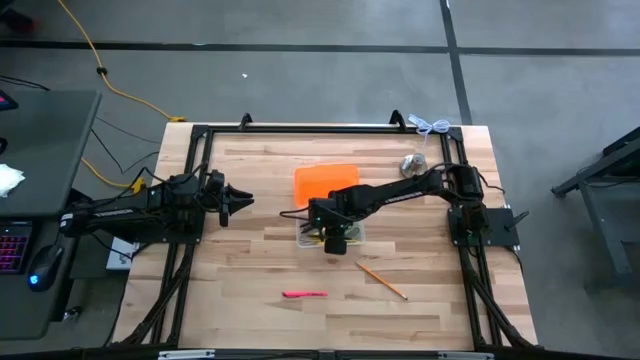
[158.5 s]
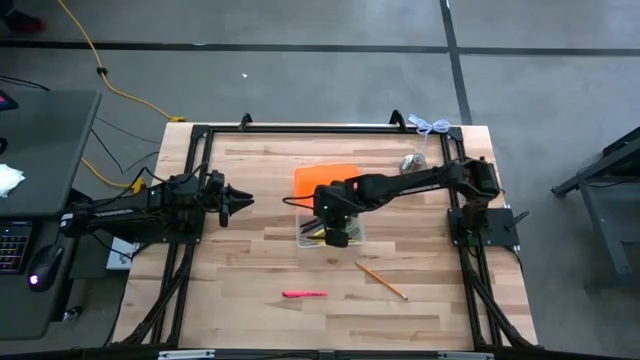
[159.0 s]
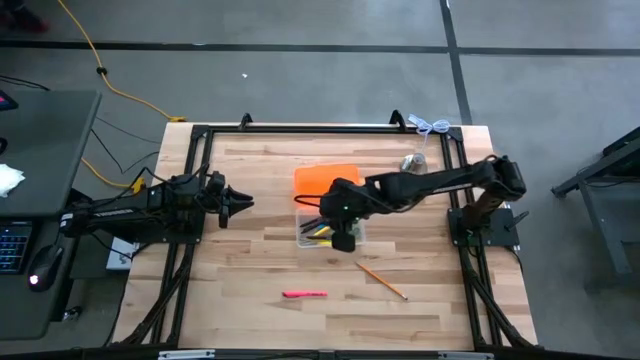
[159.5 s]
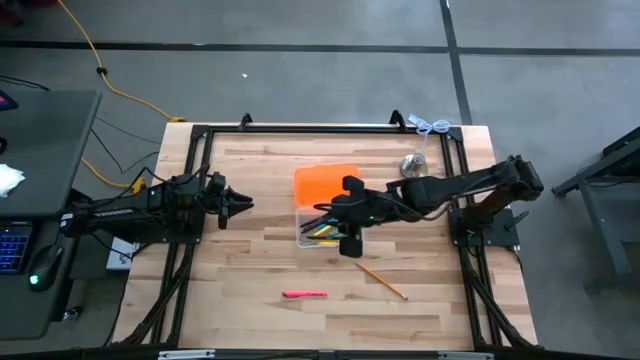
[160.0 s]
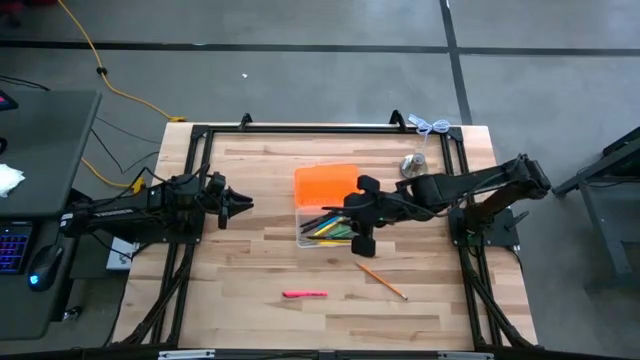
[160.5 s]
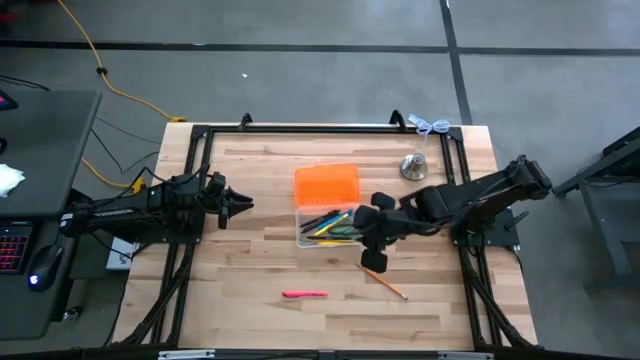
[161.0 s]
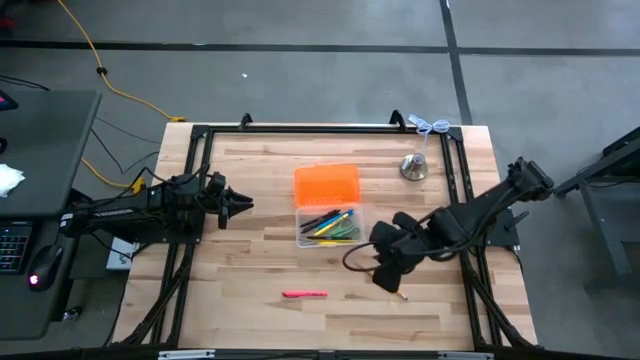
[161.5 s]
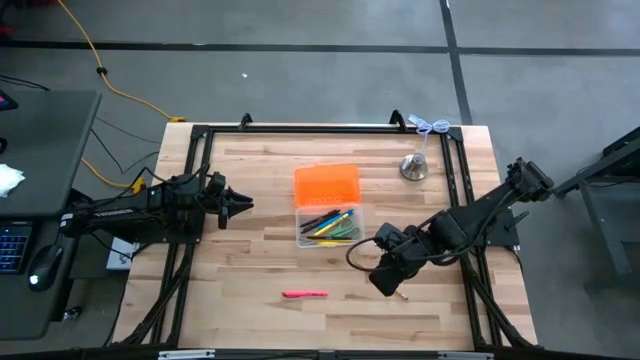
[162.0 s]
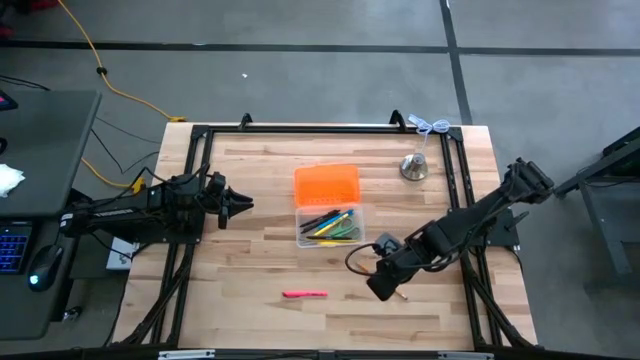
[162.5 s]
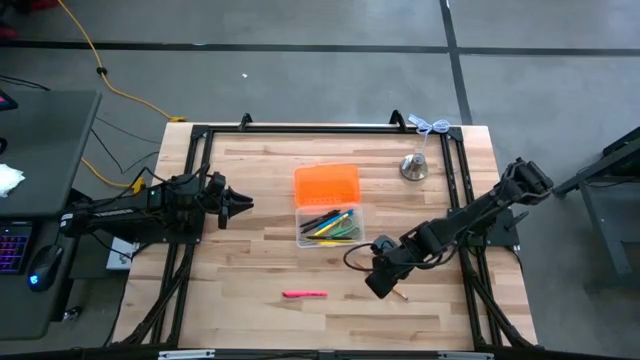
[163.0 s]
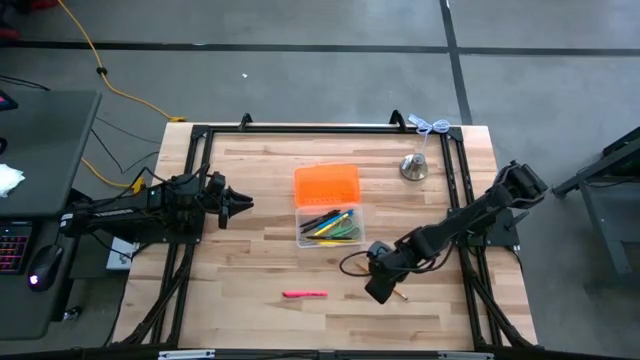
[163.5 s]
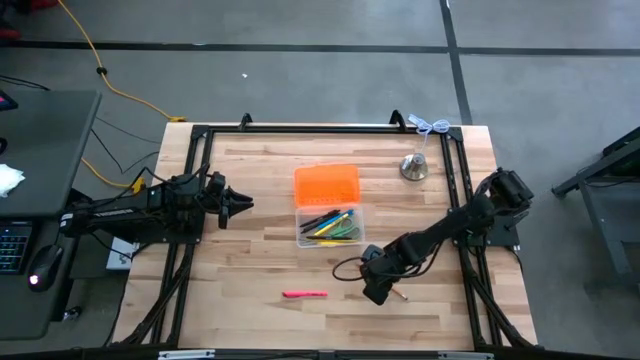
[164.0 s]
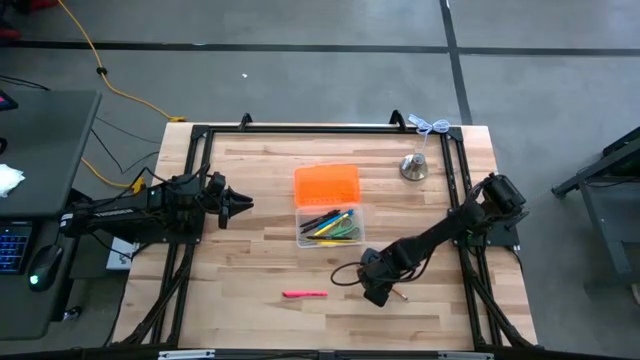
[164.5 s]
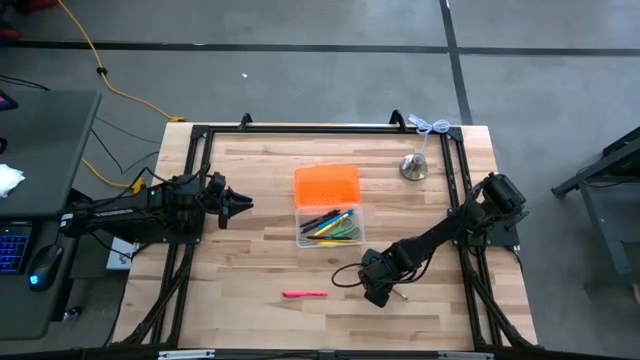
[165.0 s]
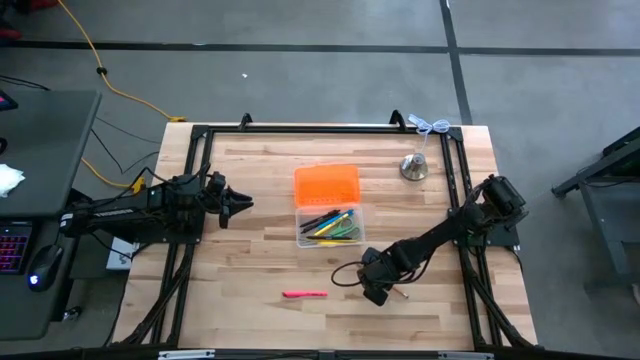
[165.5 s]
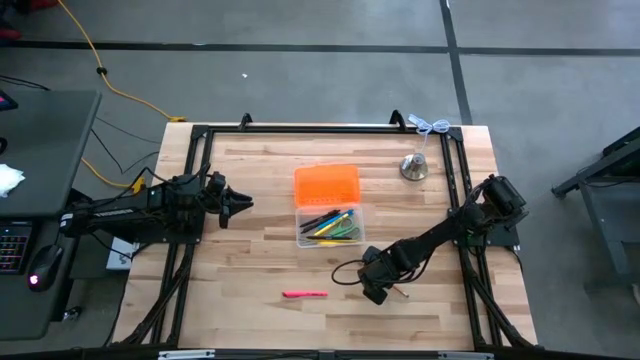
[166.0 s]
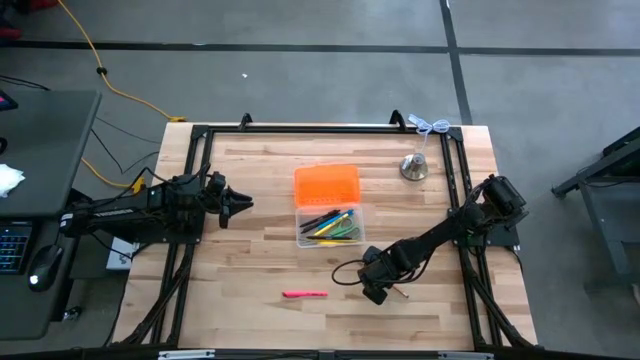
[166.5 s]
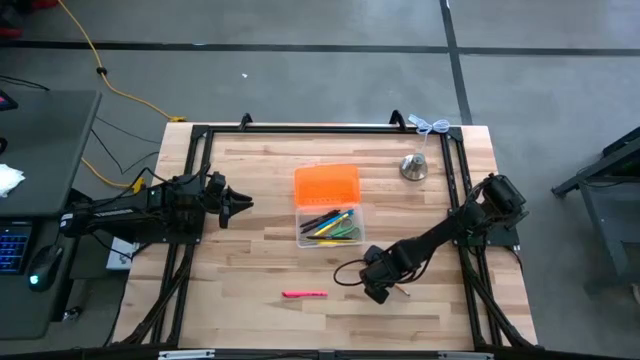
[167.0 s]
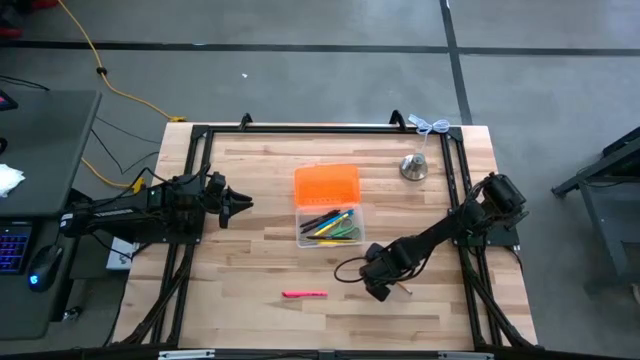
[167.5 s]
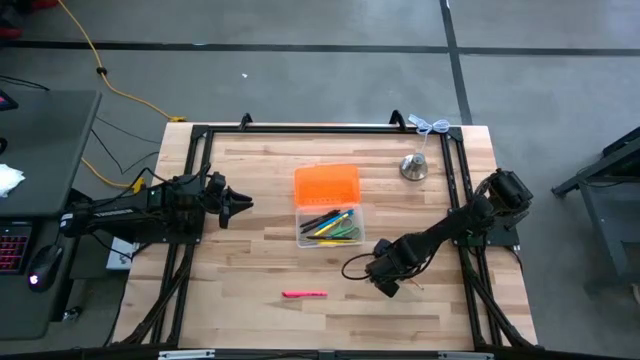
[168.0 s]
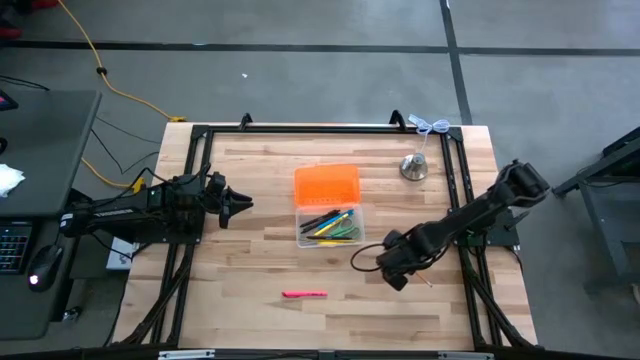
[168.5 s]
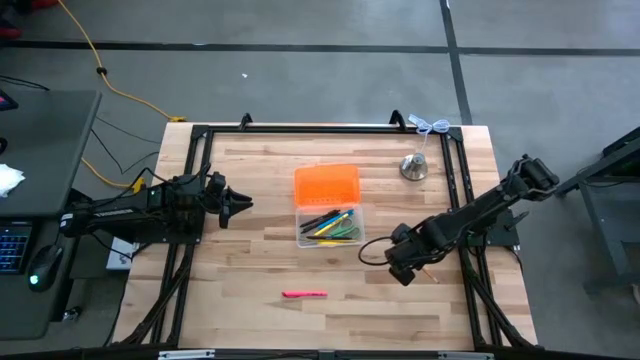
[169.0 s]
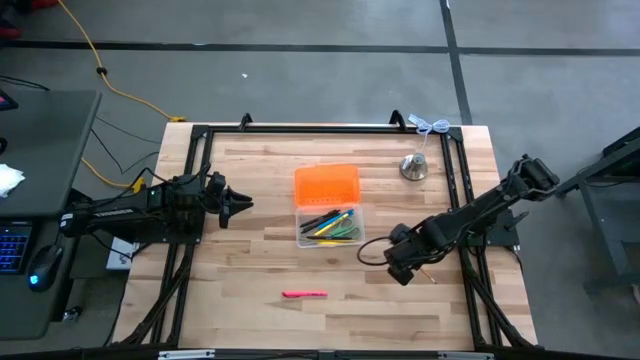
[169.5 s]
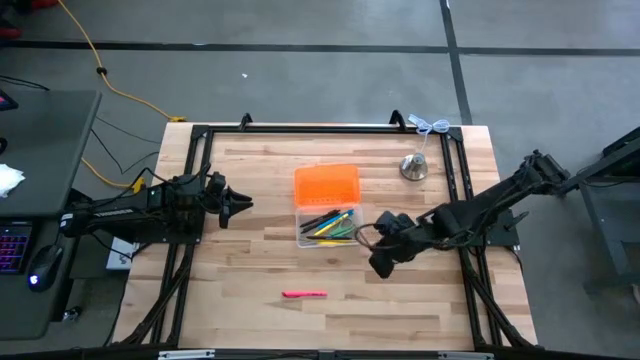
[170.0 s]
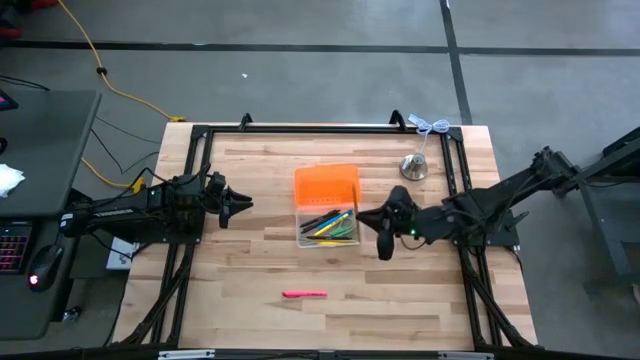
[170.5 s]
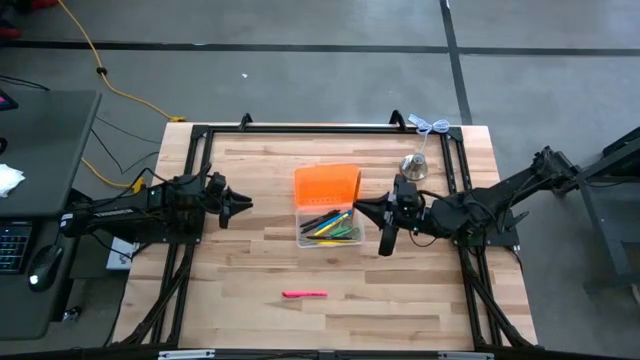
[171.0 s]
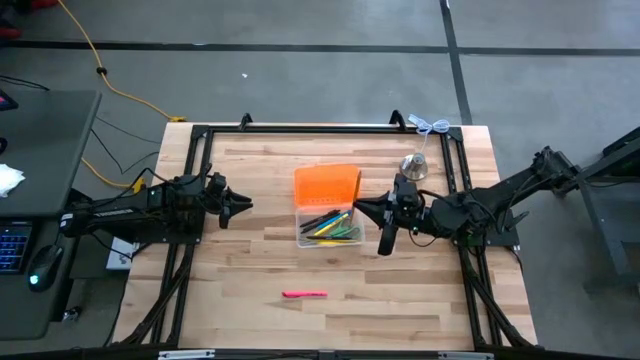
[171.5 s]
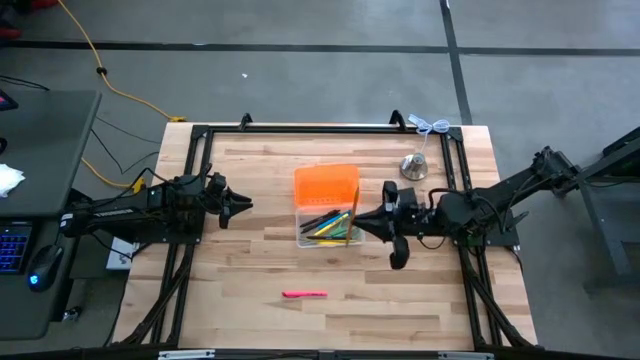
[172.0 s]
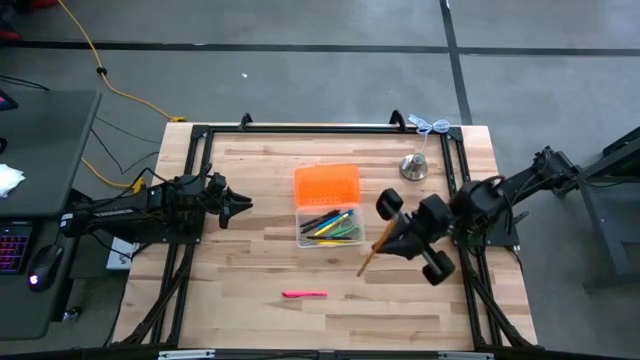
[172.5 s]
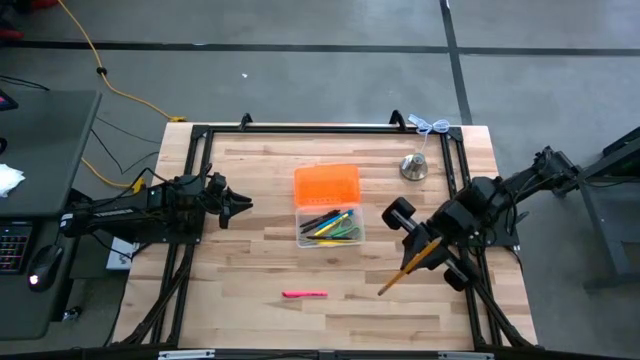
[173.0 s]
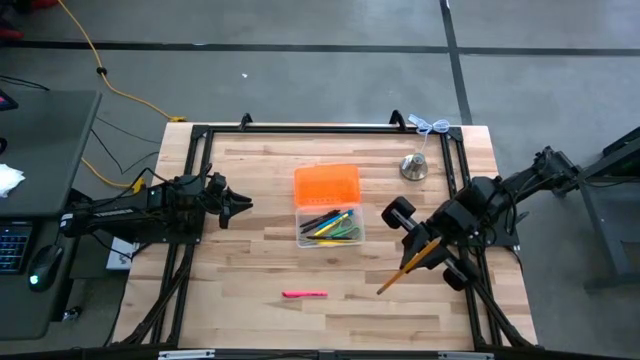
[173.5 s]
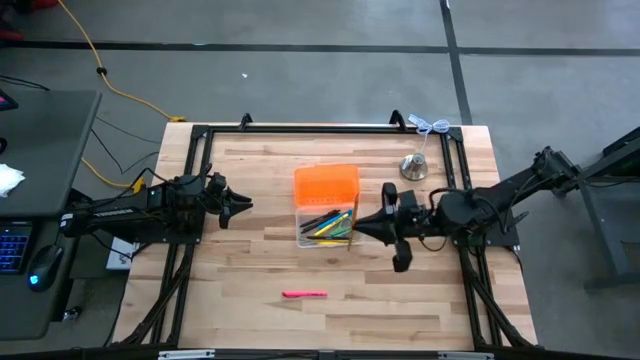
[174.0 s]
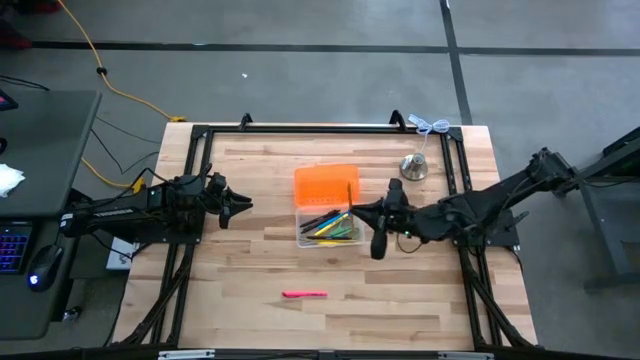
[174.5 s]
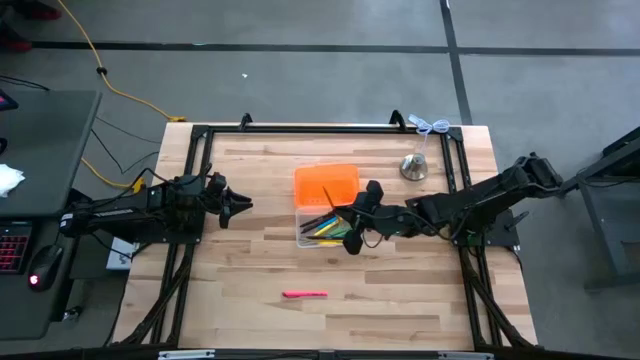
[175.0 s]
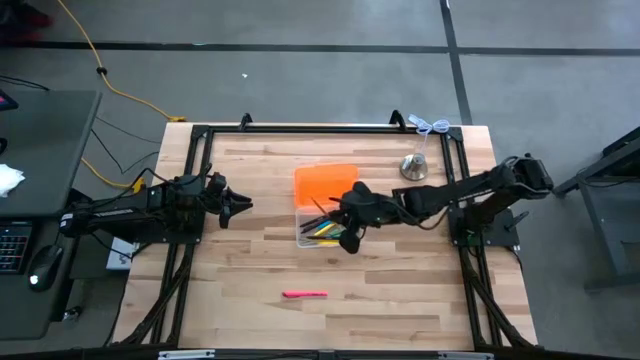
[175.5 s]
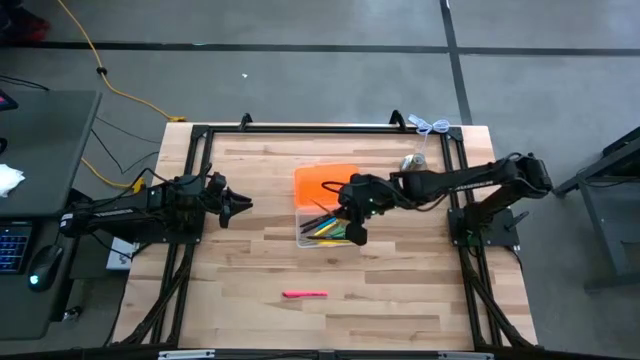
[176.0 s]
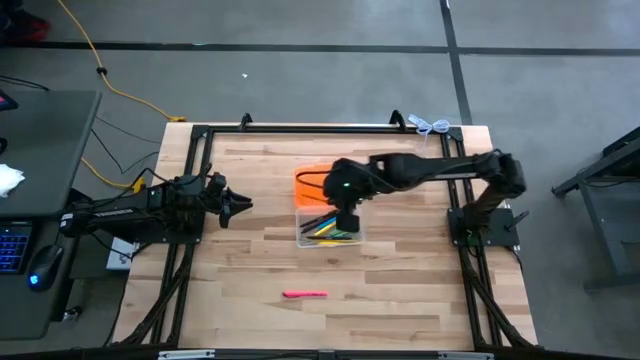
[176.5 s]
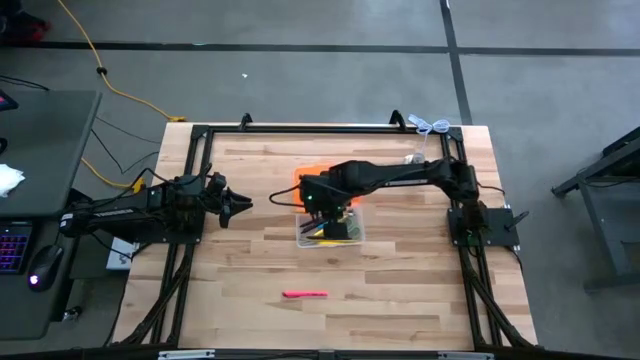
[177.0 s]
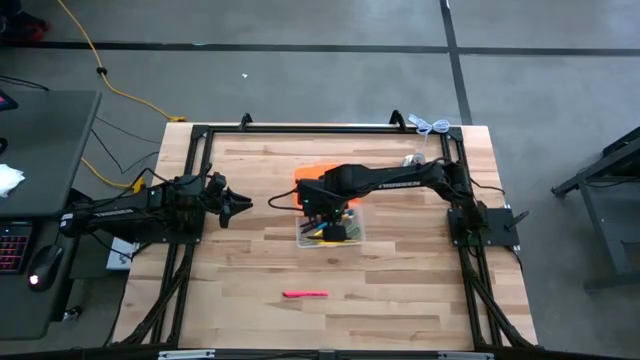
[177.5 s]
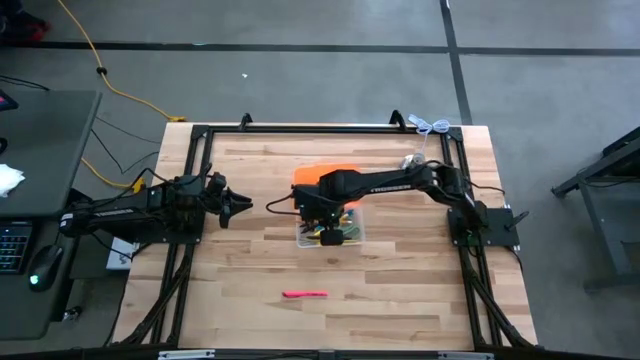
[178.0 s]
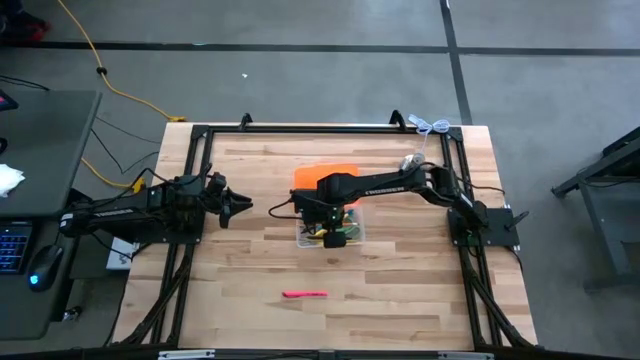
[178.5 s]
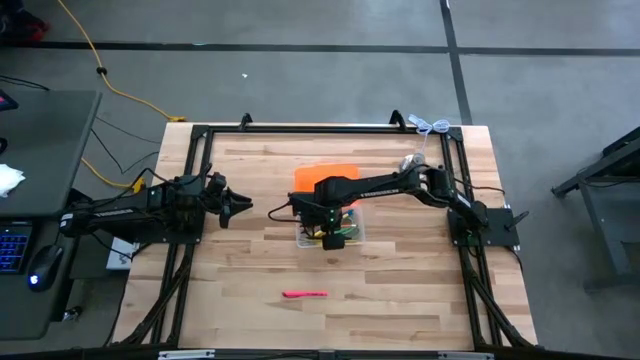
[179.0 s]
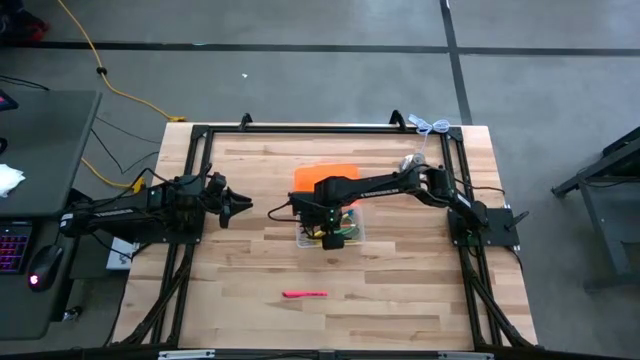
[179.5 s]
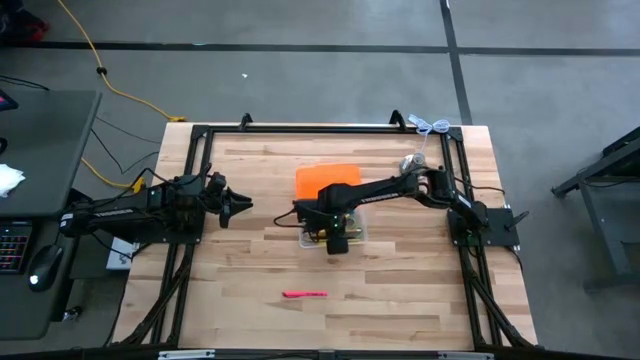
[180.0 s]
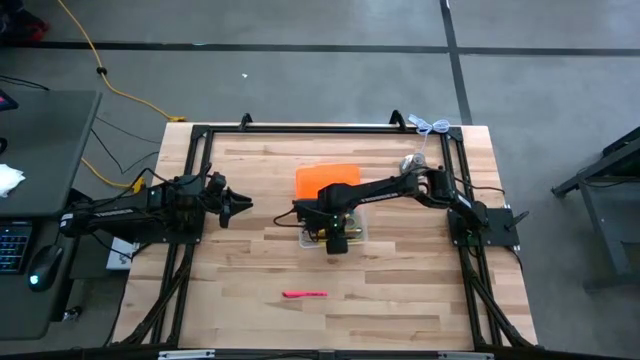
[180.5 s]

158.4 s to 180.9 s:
Task: Pick & place school supplies into a supply box
Put the orange pencil into the orange supply box
